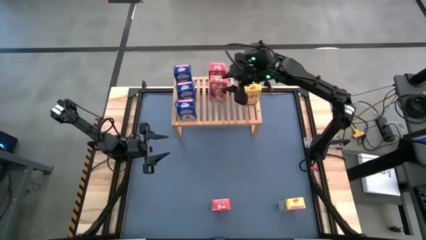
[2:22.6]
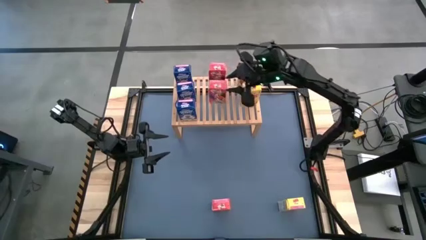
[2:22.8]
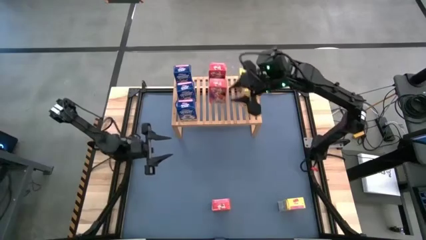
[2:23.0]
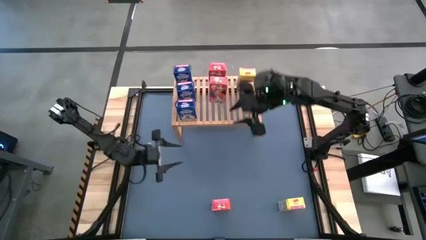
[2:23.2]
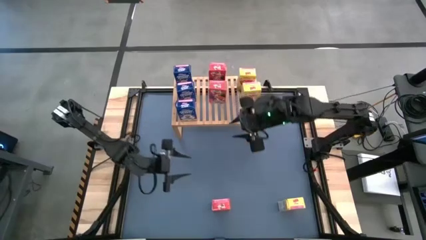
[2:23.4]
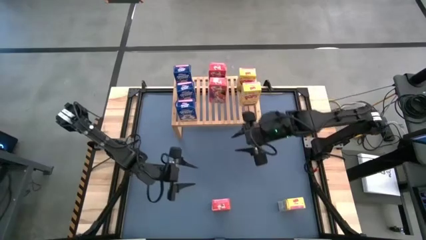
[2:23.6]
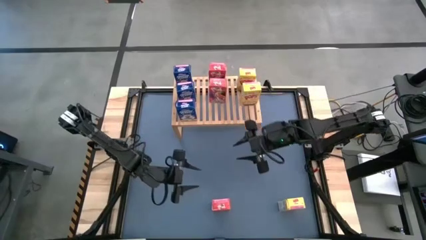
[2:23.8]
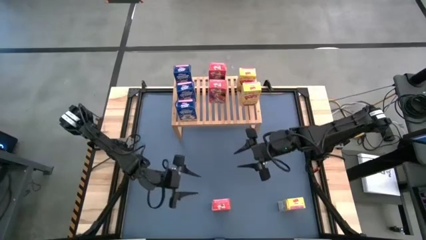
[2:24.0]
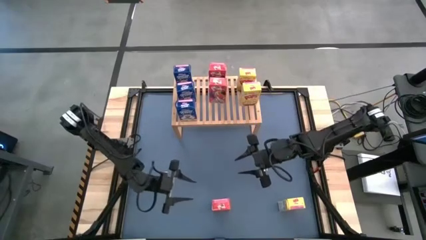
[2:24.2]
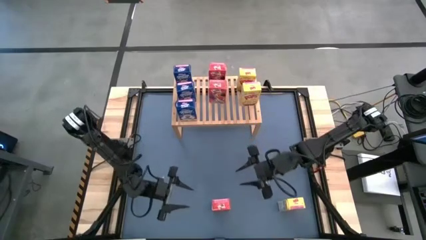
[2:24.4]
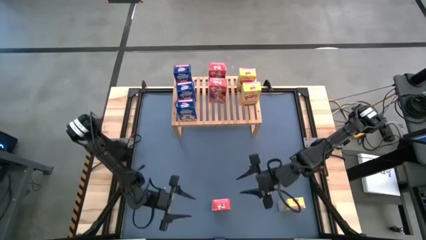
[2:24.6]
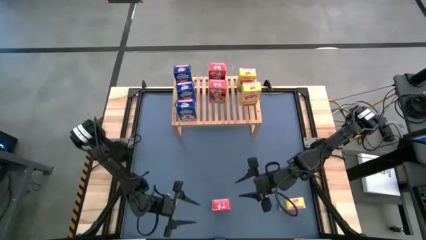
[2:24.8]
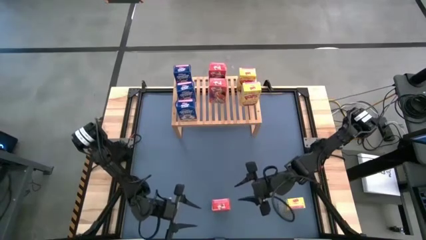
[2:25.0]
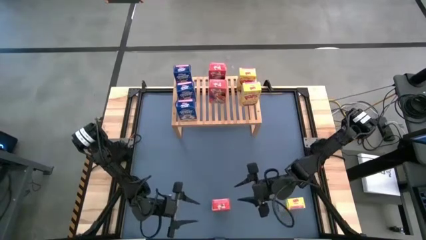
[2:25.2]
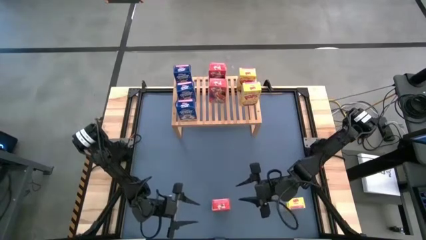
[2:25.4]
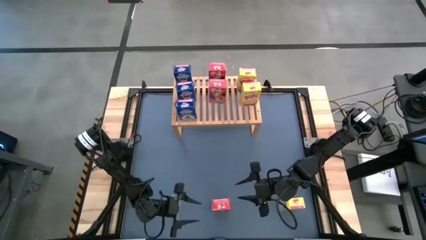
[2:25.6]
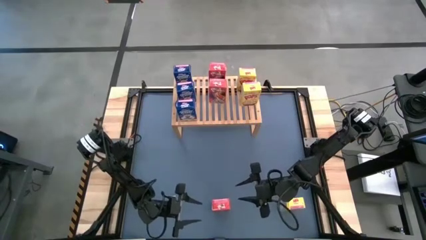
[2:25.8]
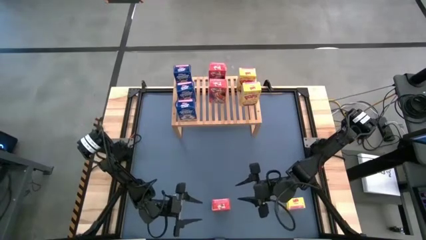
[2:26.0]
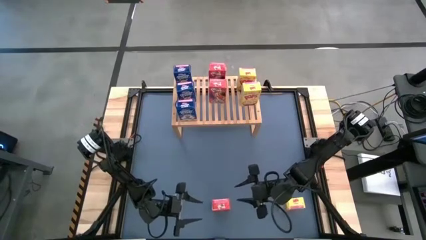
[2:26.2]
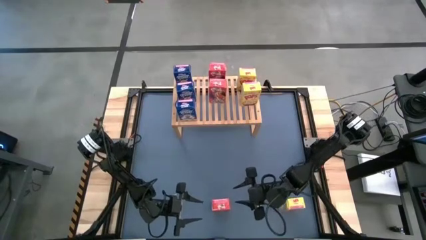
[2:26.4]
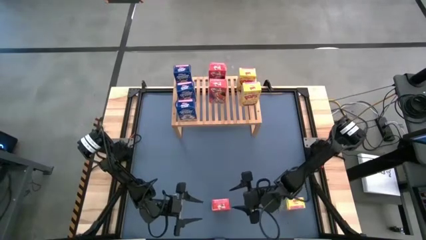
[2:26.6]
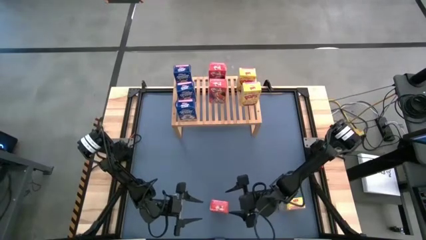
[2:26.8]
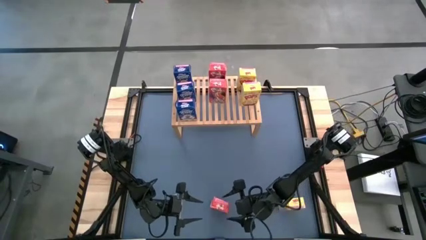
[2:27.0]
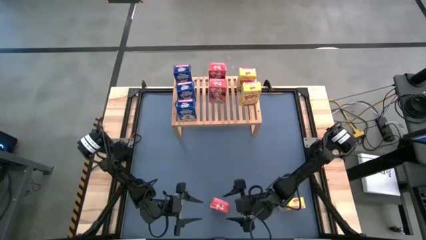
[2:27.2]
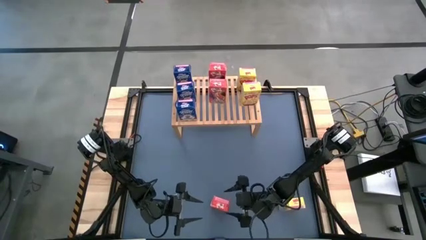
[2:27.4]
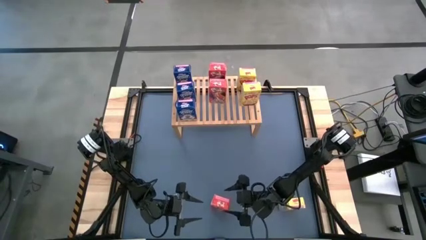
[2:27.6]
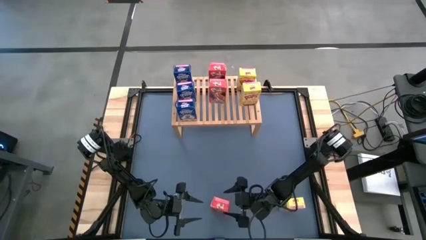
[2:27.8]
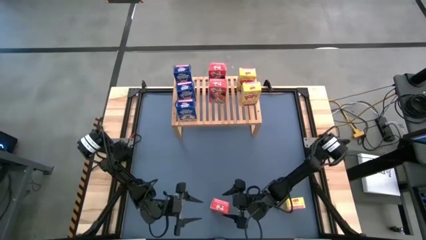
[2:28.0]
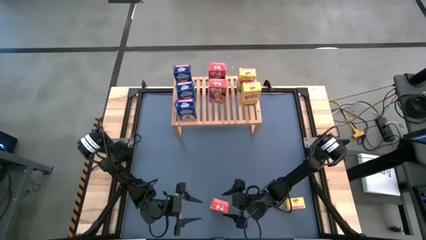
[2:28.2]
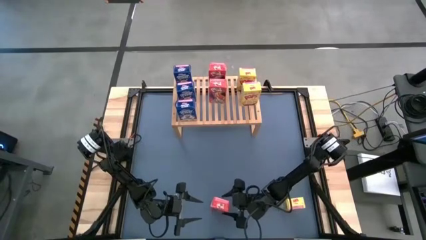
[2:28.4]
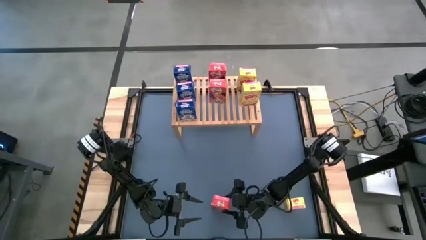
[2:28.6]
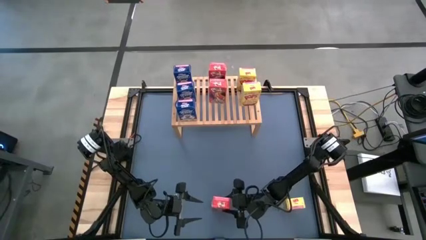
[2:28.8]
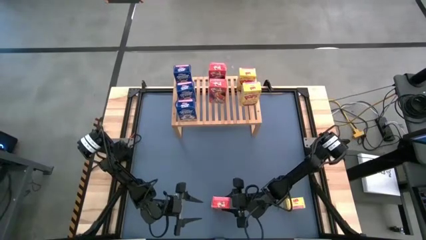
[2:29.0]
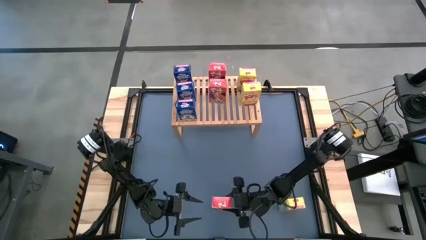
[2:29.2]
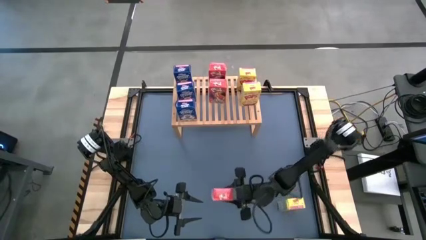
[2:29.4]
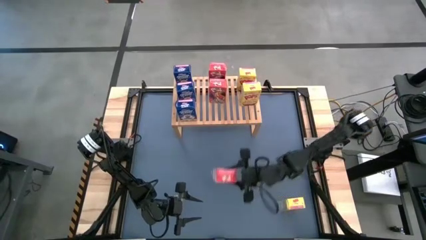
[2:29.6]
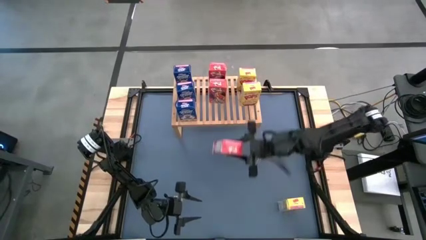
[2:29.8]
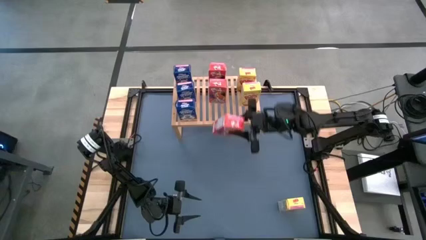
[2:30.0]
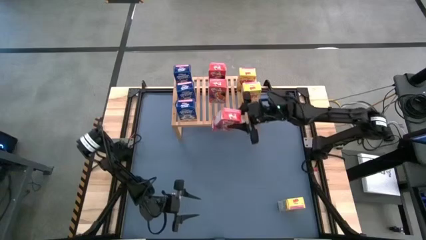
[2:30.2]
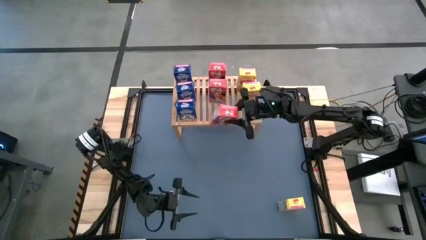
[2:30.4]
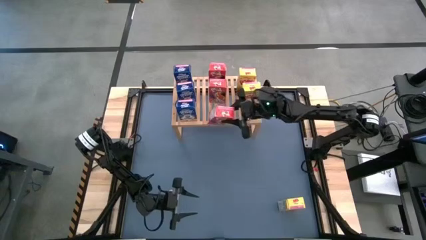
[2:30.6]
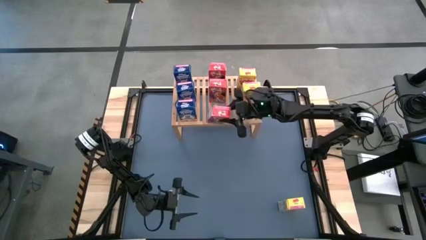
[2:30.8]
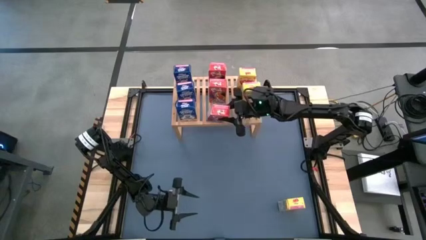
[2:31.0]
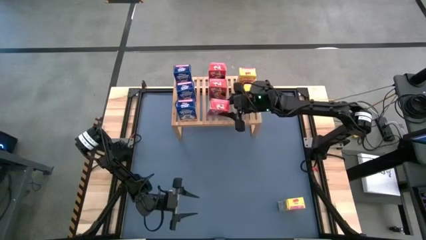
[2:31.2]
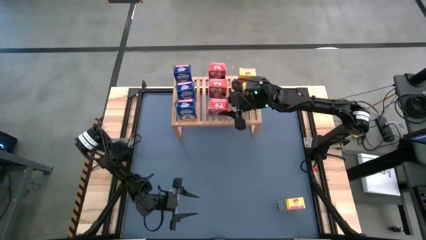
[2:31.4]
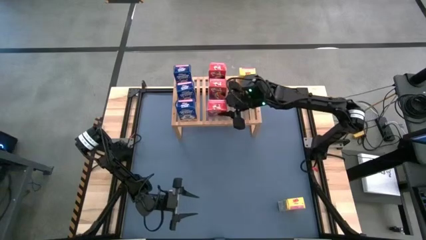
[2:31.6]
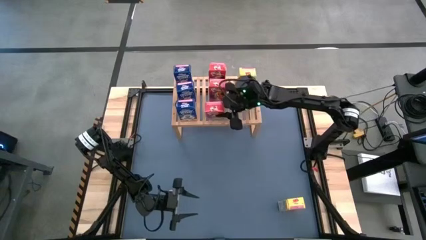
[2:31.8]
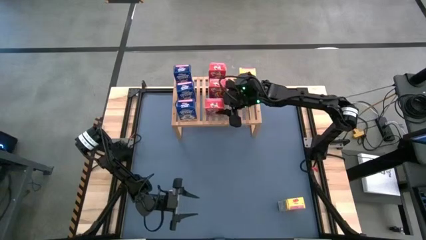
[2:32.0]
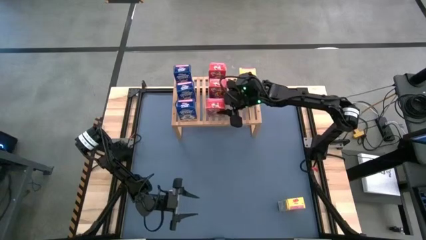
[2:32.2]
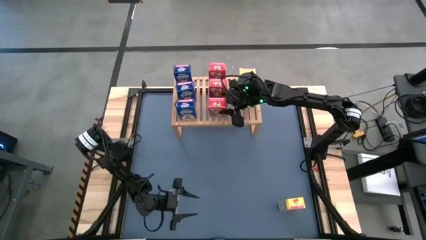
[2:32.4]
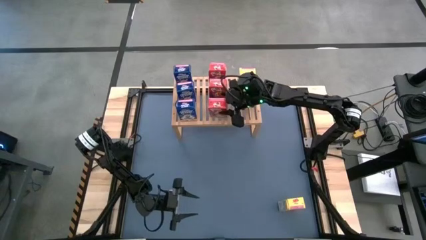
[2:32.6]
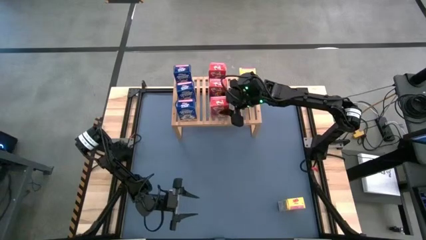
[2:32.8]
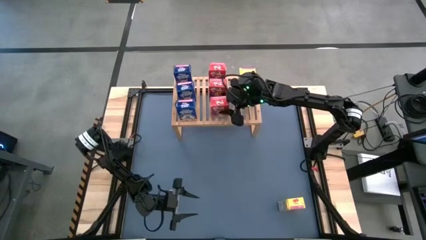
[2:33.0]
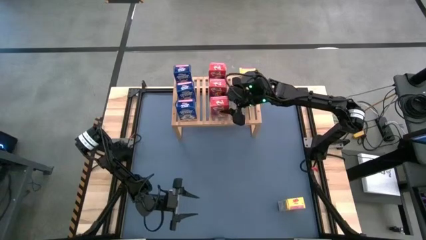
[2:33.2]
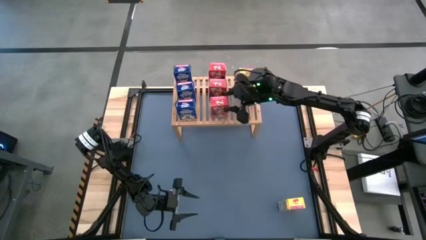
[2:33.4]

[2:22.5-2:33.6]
Task: Stack cereal on shelf
Put the red cereal box on the shelf aligned with the other red cereal boxes

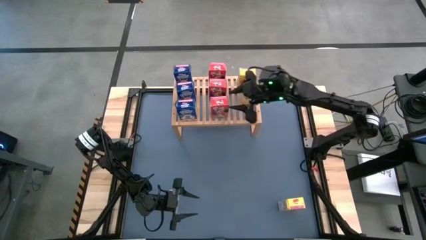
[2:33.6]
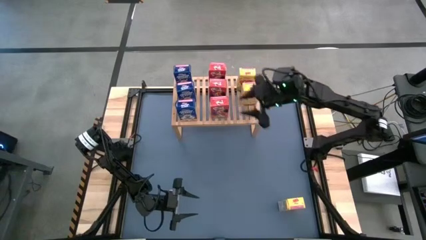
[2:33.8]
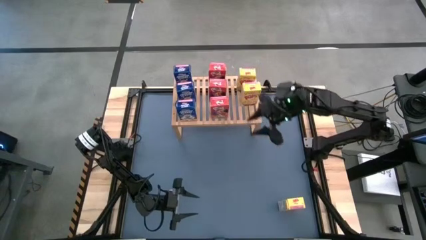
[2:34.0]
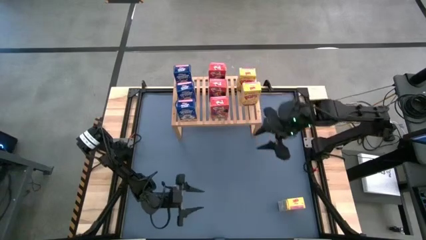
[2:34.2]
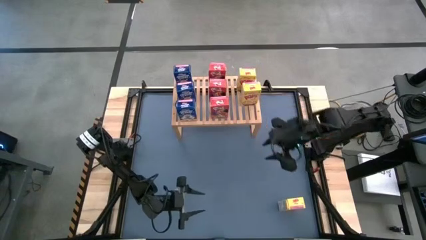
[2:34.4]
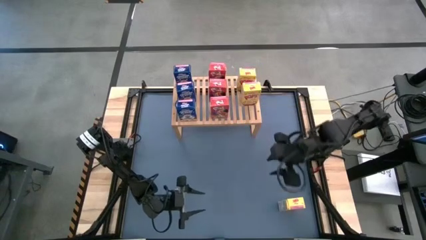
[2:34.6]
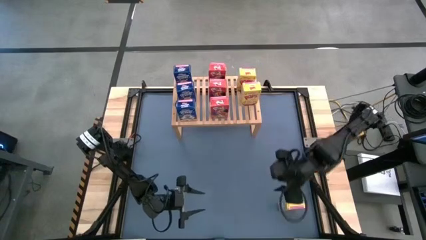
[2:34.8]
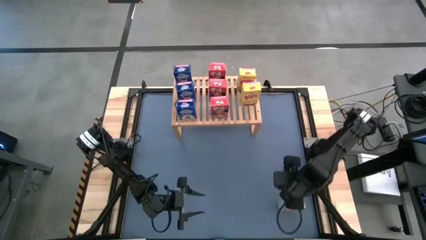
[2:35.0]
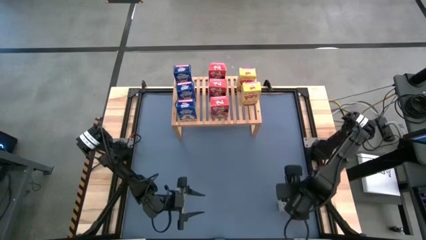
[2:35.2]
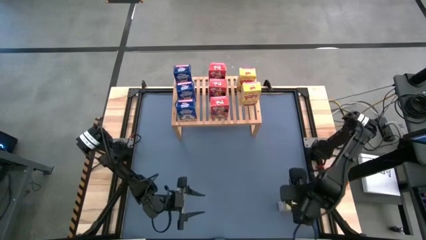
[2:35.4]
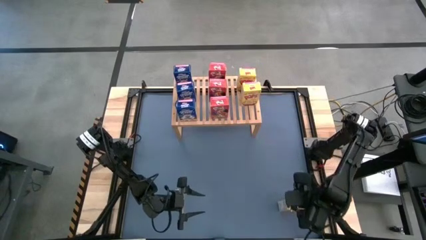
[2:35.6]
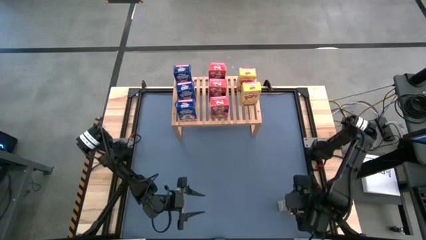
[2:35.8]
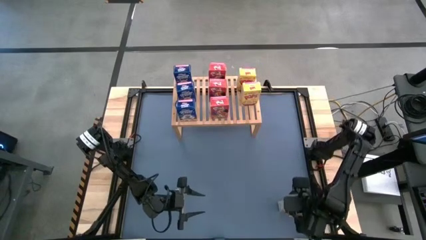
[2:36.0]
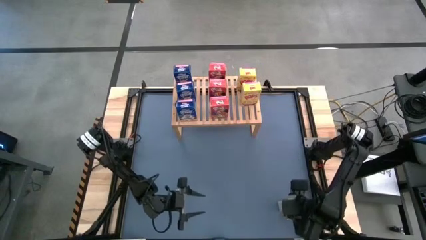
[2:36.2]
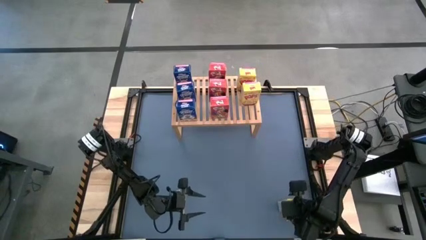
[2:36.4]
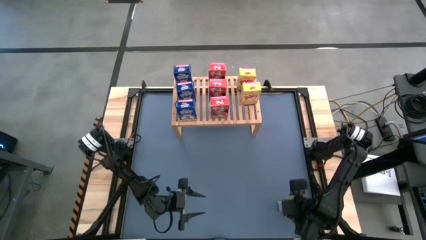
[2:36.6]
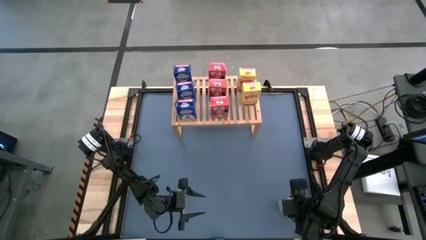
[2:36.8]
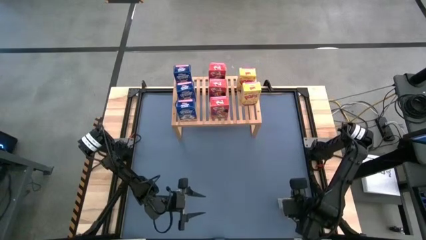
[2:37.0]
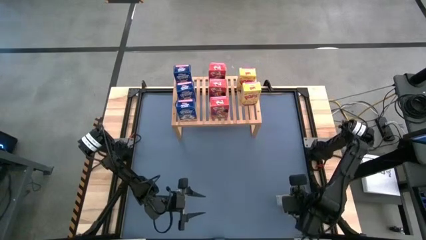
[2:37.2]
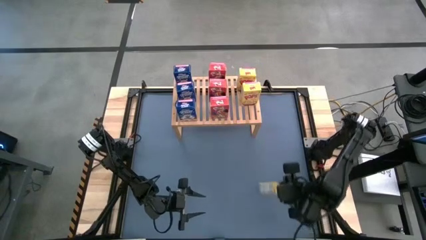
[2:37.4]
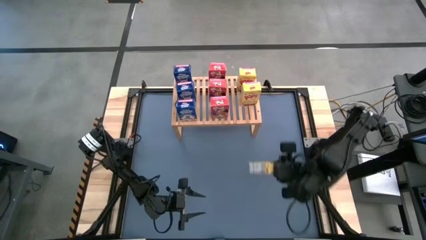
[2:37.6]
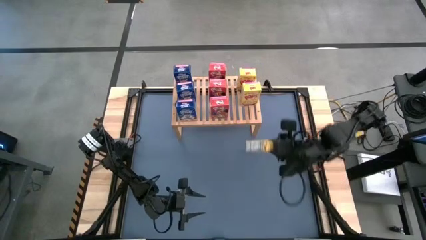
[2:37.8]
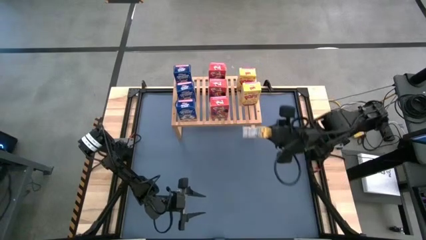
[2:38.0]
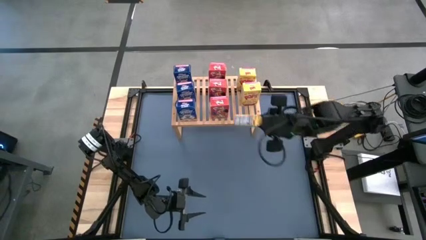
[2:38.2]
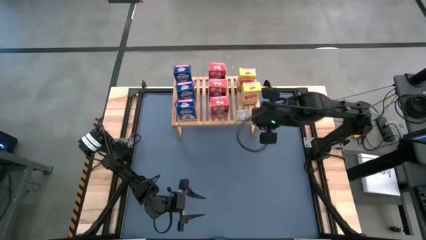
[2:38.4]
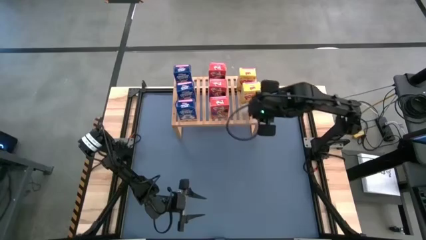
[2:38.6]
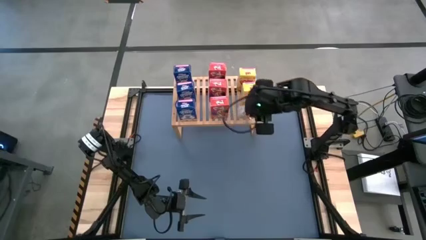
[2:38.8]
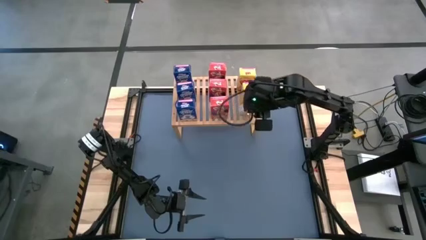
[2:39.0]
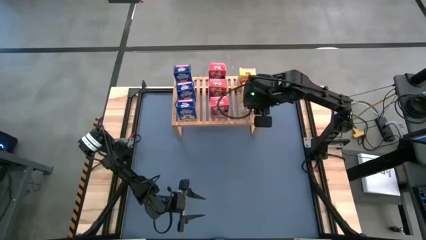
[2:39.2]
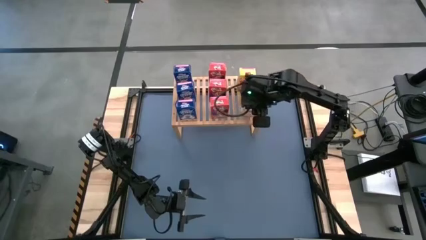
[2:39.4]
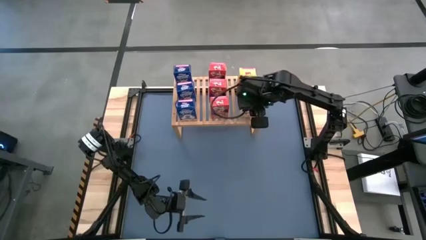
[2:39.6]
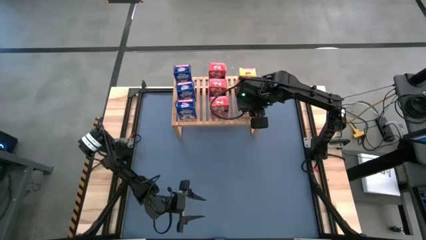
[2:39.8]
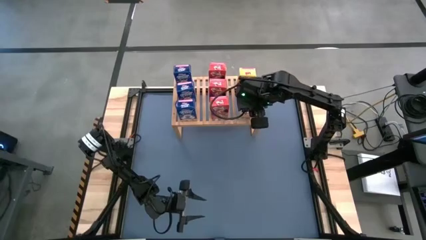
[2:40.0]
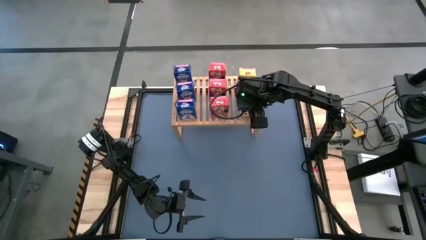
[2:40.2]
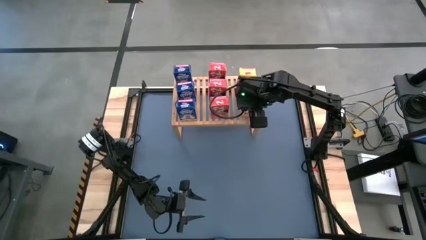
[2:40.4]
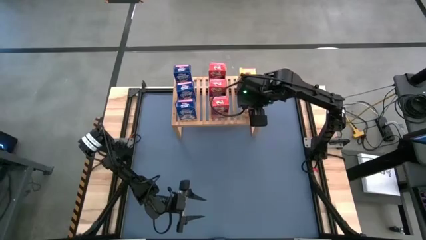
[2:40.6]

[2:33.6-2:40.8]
Put the yellow cereal box on the shelf aligned with the other yellow cereal boxes
